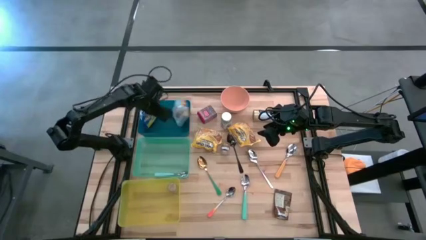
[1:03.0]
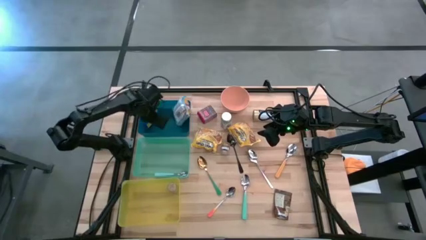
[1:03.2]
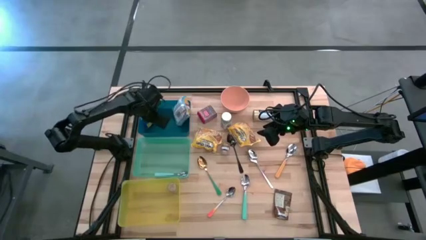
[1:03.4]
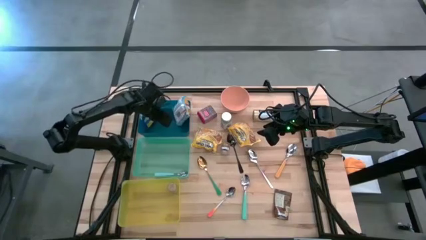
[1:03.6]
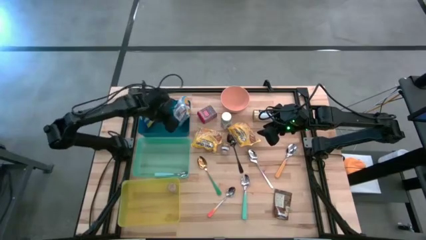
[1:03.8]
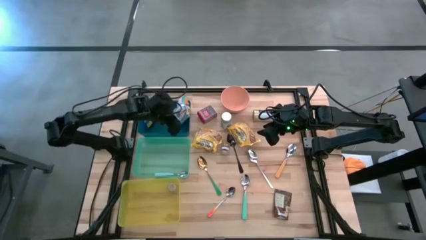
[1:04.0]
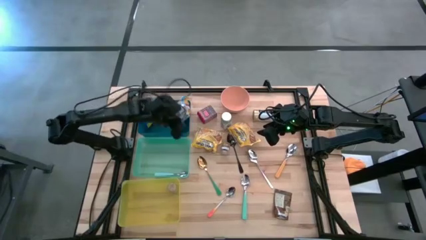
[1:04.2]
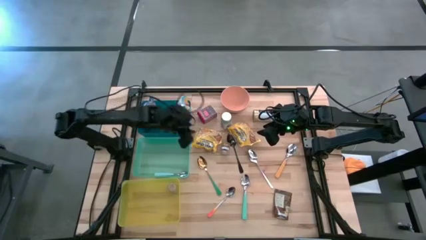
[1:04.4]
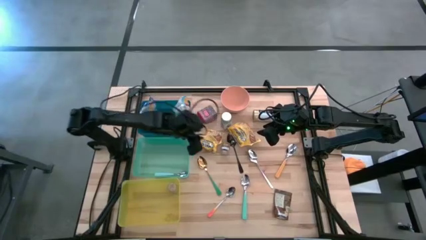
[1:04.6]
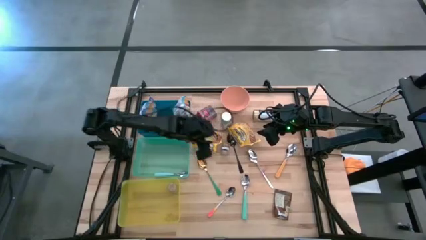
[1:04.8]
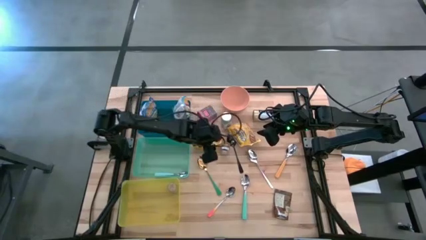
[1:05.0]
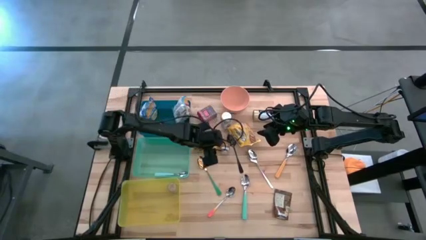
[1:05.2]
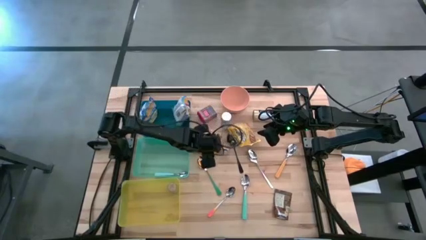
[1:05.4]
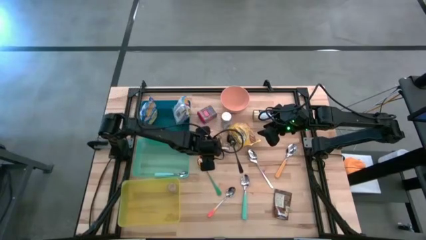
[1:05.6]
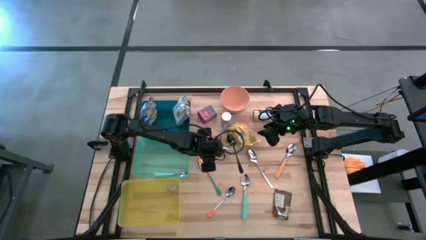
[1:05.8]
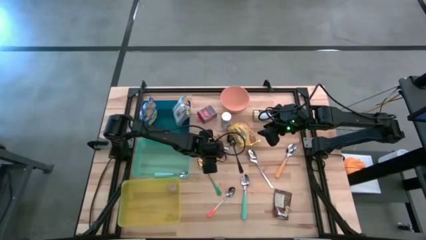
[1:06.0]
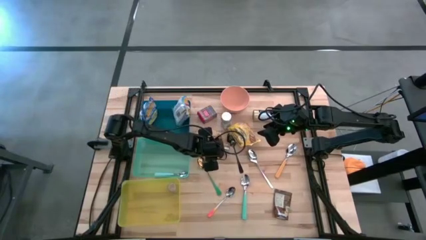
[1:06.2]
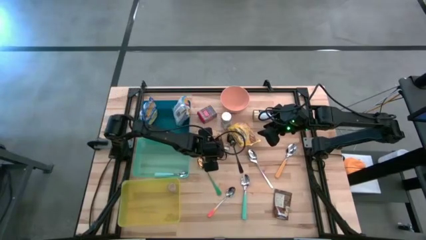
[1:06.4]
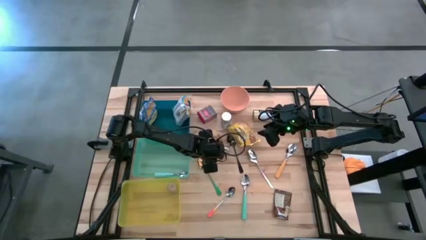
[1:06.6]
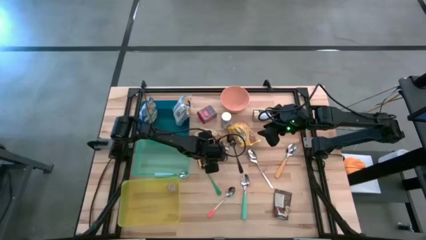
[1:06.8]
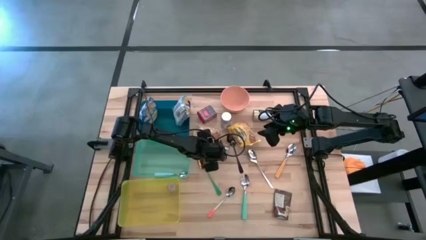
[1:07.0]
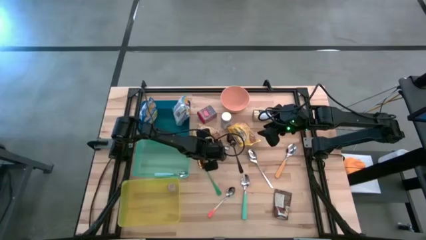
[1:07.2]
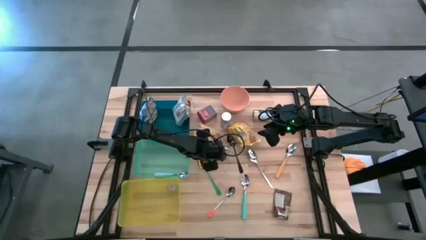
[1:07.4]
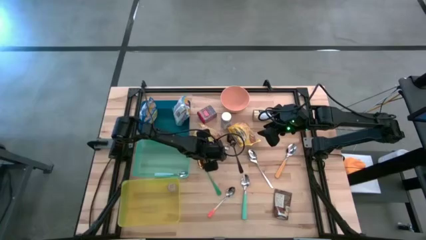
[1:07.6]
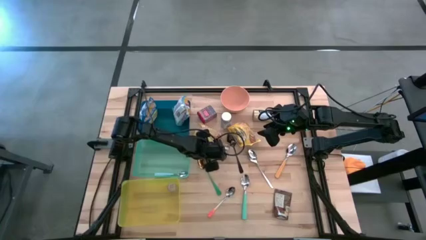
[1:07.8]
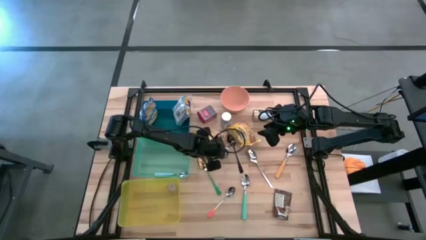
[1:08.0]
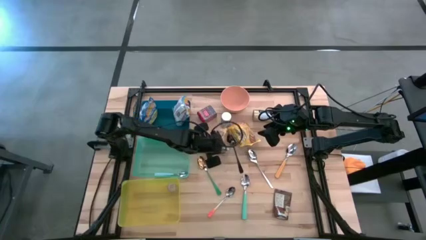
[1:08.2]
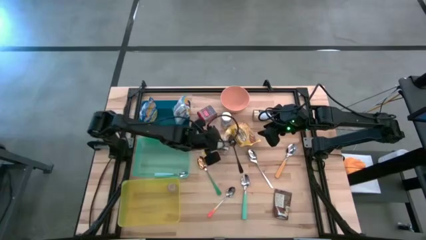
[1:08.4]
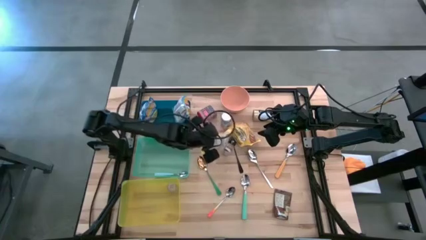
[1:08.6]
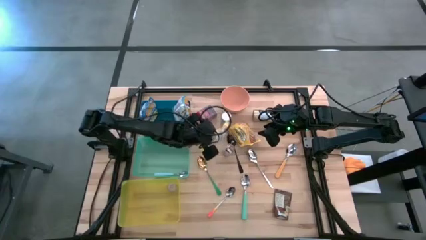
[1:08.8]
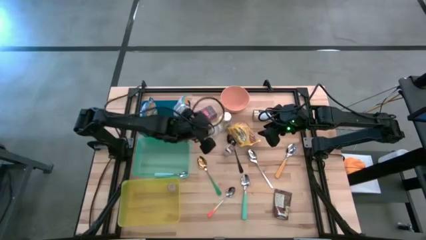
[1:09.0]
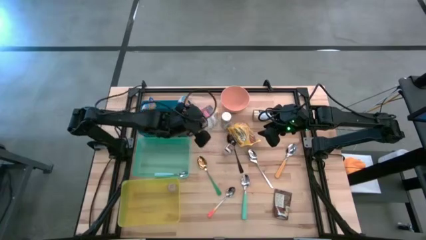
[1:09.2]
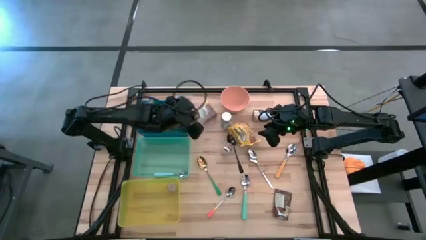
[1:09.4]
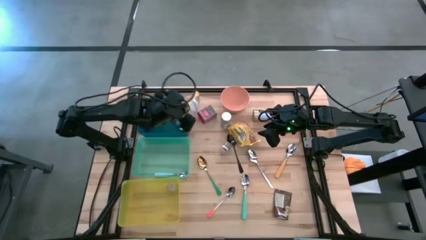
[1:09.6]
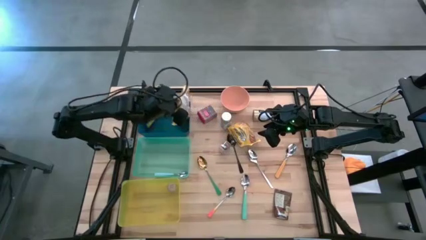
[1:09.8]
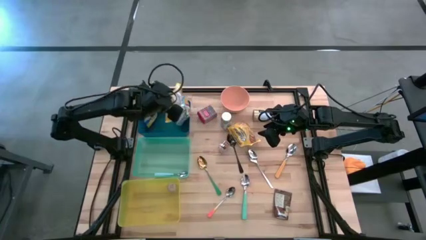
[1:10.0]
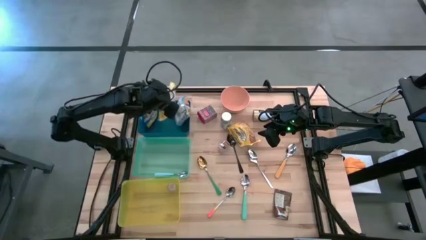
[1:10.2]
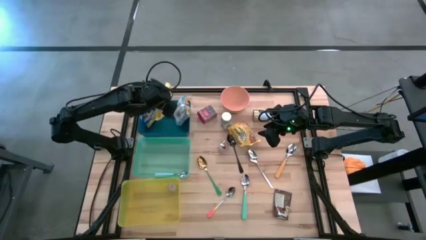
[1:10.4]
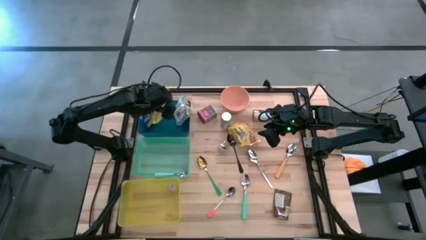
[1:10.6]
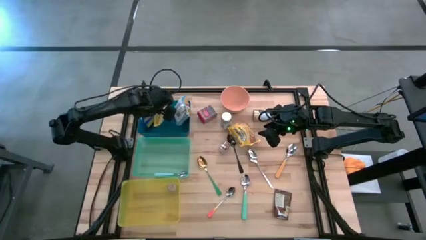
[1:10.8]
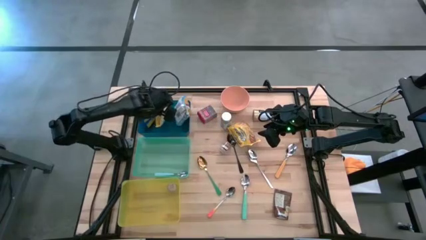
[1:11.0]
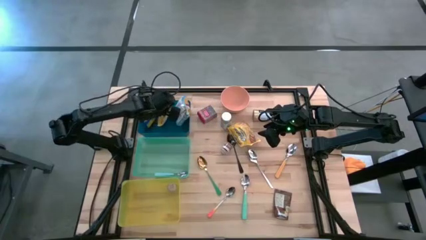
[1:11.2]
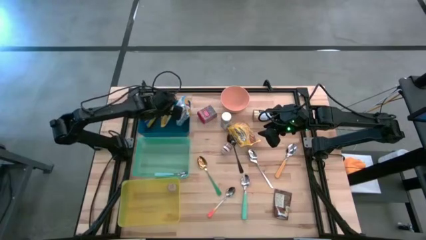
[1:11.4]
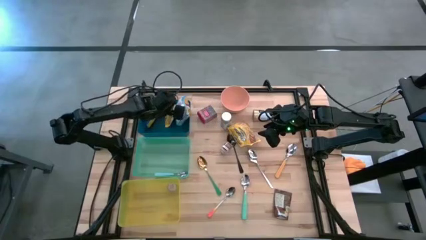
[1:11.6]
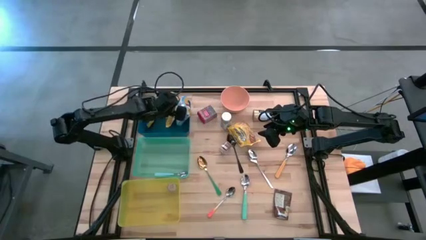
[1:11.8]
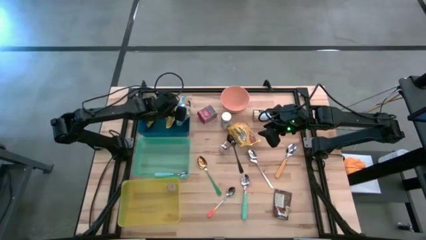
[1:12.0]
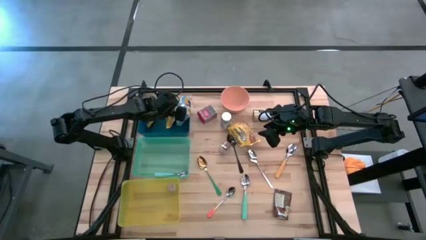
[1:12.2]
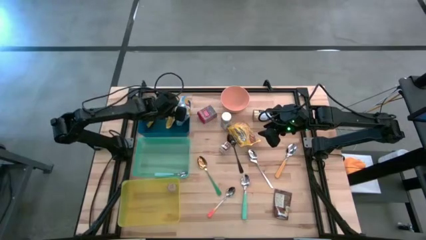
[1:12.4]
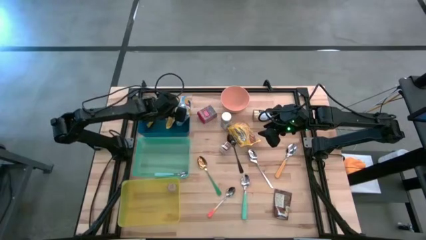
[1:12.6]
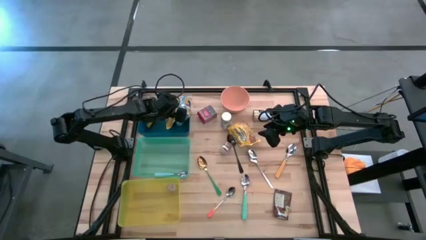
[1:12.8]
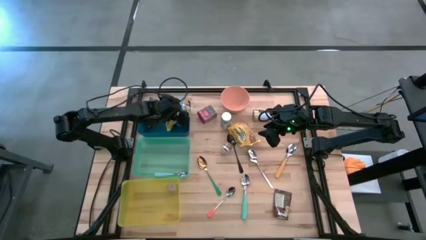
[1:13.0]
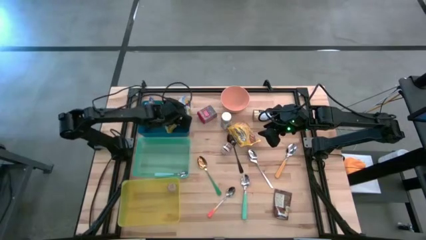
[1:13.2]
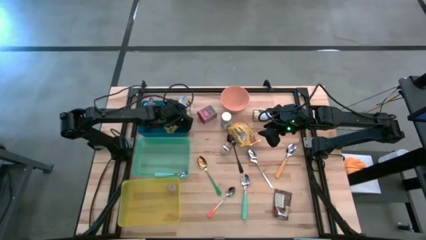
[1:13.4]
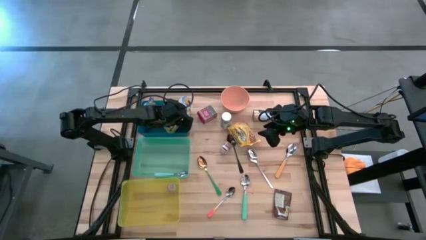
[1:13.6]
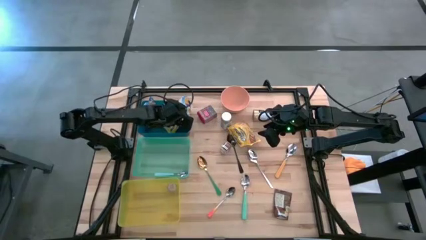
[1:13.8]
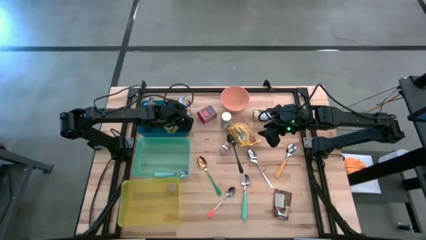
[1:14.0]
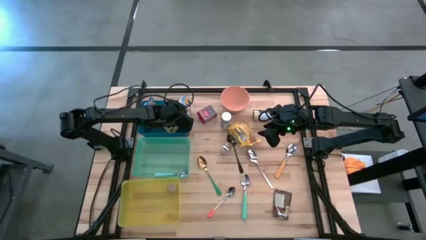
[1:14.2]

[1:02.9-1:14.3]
Put the left yellow noodles packet into the blue bin
